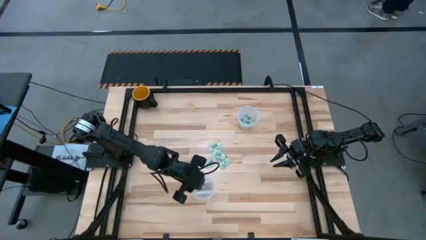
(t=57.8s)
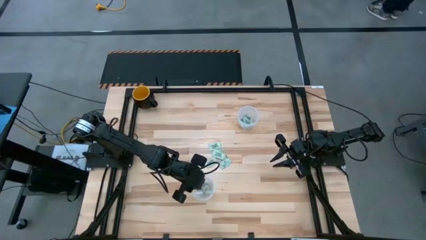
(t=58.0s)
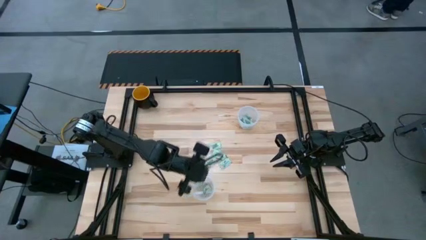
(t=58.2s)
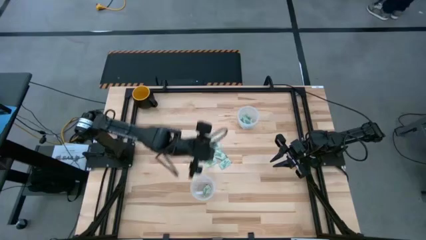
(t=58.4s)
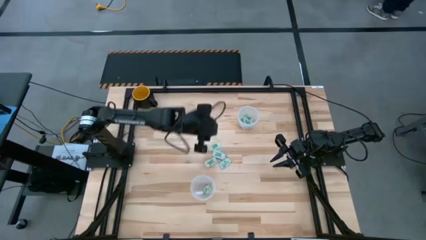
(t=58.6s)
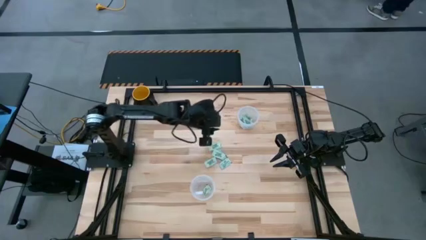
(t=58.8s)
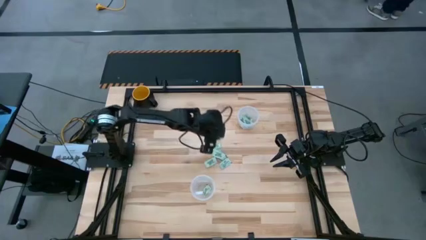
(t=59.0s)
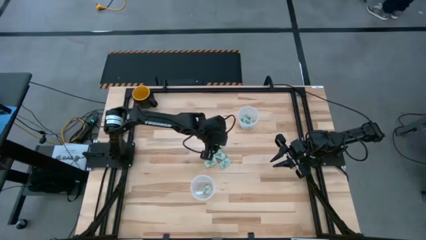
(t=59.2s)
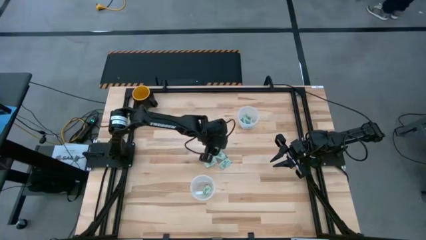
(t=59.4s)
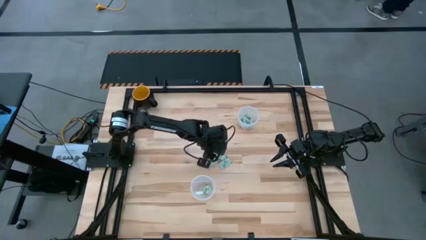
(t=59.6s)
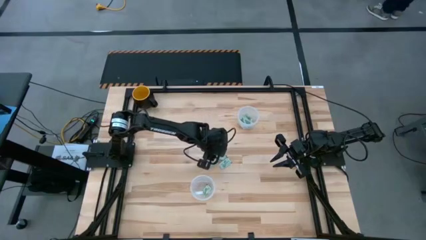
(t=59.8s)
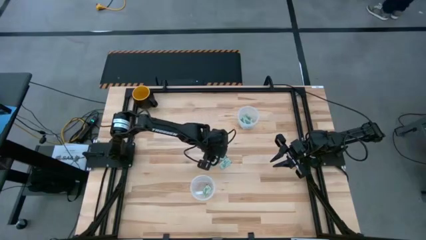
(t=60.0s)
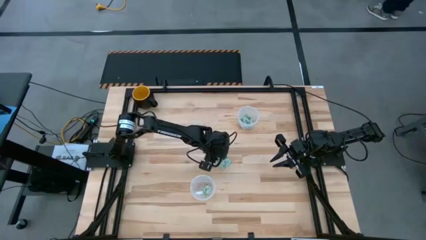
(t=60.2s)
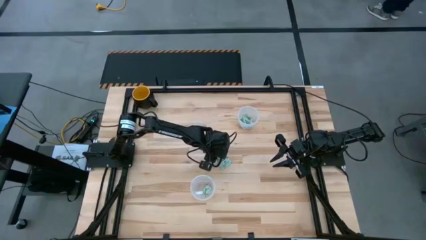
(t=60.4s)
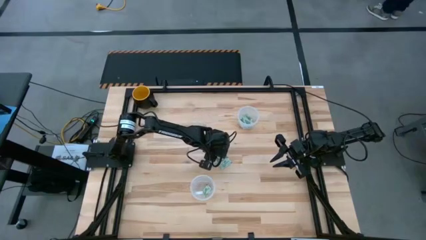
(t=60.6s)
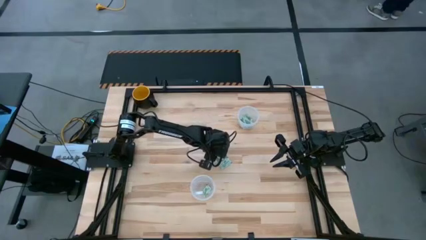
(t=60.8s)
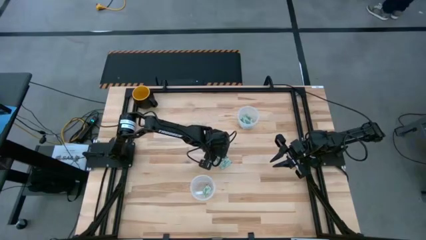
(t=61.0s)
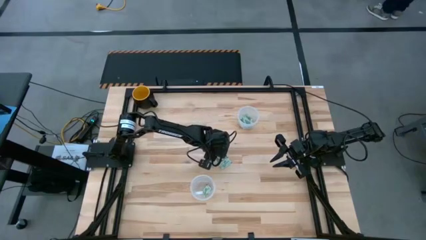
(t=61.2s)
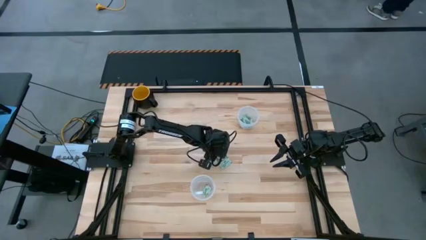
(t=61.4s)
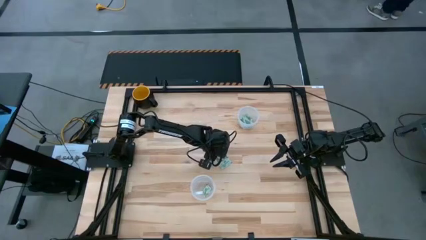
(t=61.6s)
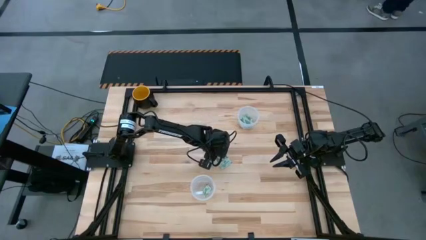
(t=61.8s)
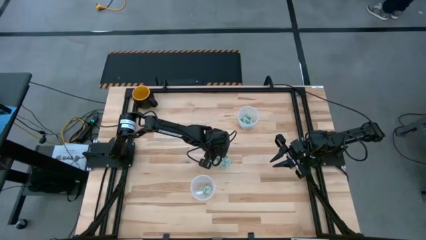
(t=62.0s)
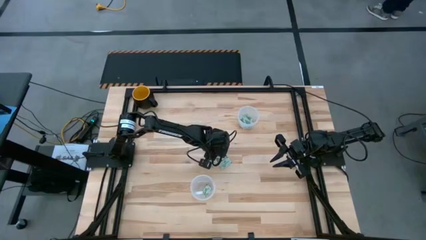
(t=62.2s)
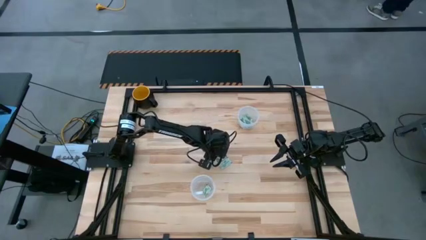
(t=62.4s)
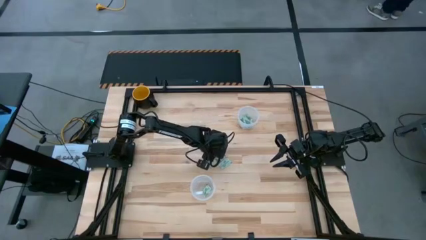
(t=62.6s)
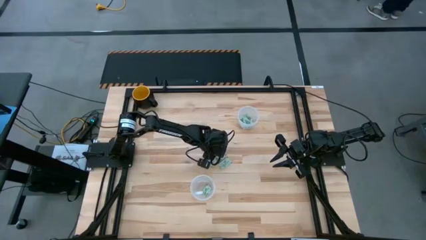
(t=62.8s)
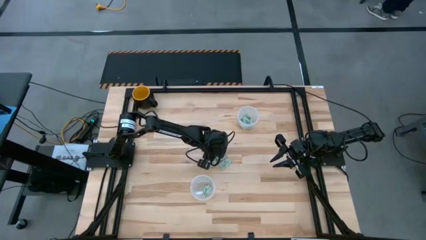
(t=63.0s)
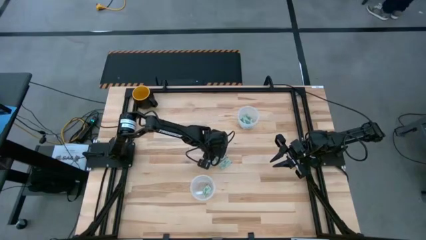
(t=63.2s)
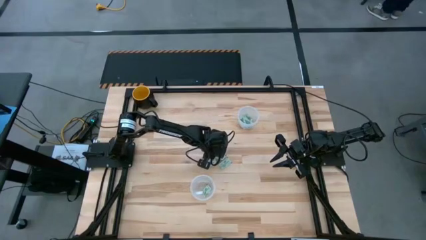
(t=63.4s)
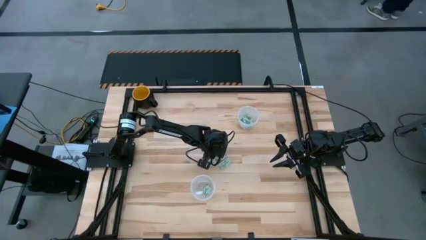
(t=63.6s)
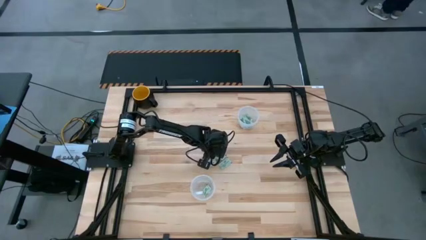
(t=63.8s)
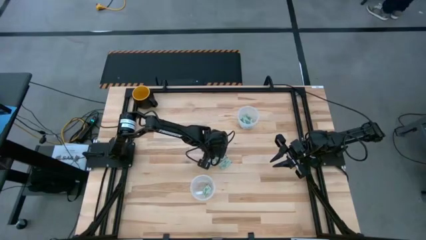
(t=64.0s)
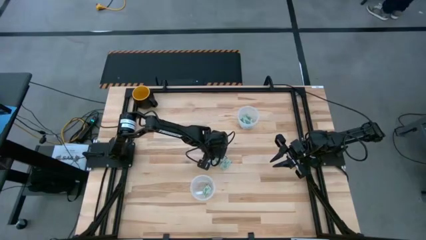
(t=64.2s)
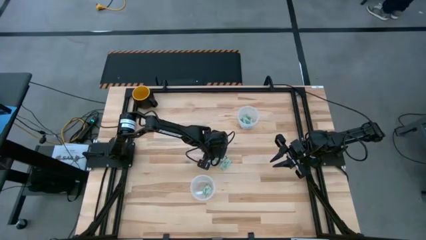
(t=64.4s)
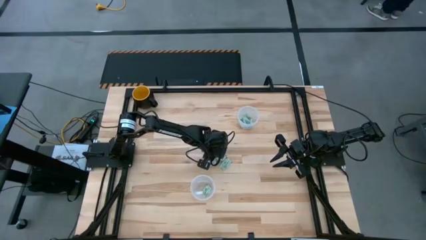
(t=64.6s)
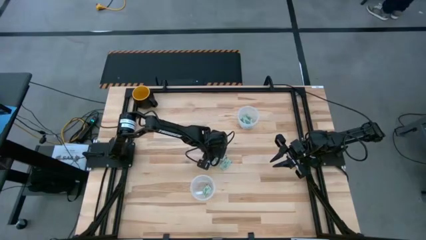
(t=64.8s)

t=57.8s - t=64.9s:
Task: Pick and place Stevia / Truvia into bins
Put the stevia packet into the bottom transparent container

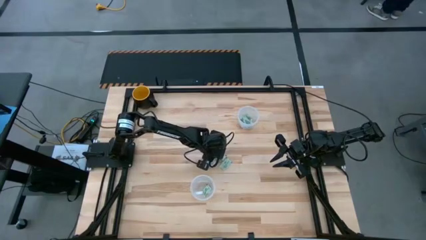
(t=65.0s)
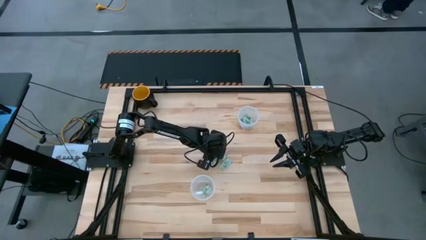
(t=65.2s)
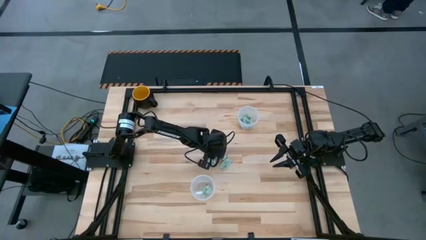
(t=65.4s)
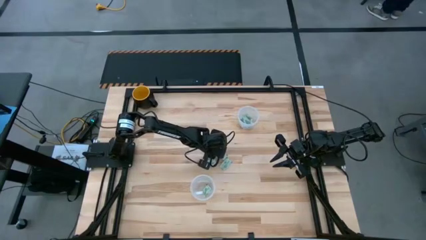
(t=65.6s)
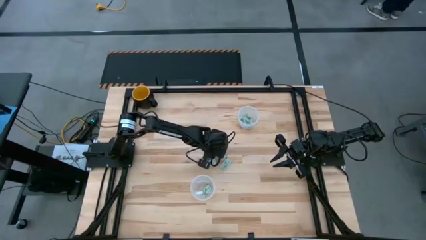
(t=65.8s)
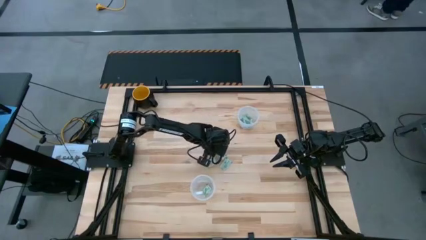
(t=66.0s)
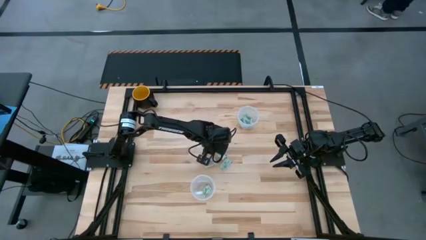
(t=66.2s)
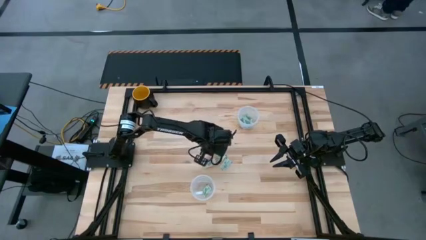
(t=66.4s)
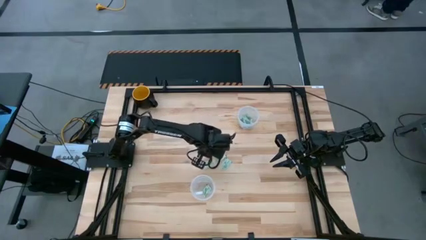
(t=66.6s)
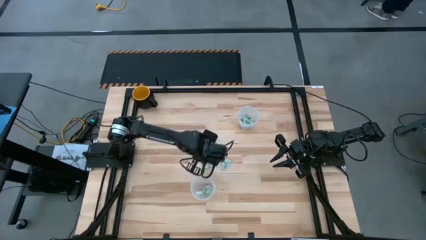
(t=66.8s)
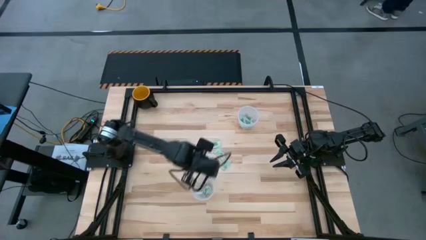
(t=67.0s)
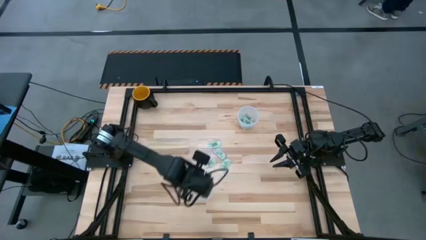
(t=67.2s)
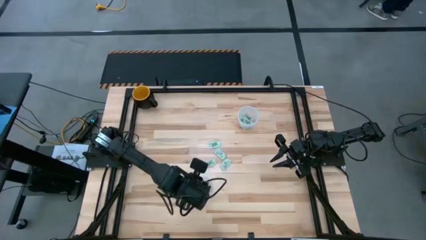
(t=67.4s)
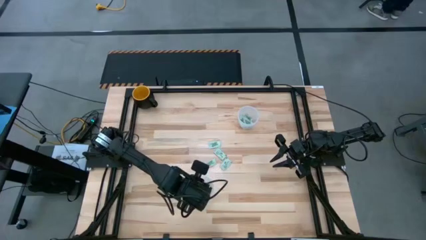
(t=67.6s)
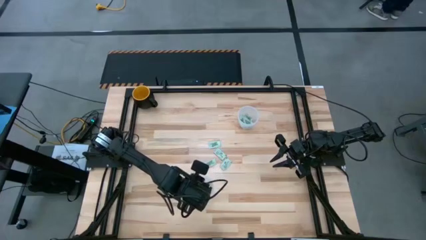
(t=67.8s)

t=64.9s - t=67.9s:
Put the stevia packet into the bottom transparent container

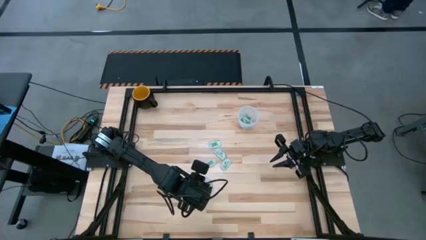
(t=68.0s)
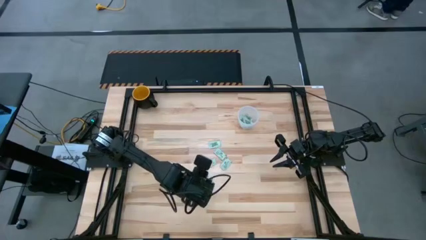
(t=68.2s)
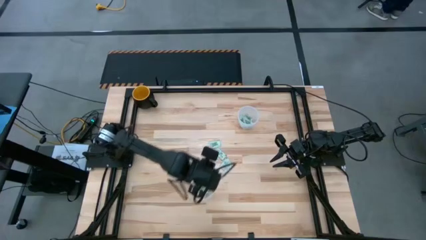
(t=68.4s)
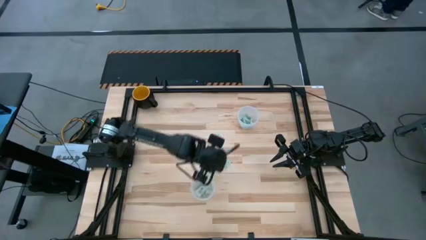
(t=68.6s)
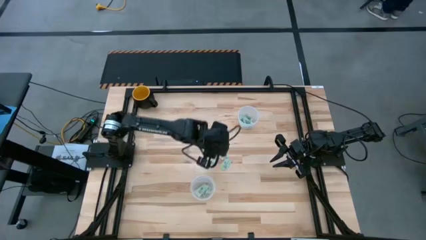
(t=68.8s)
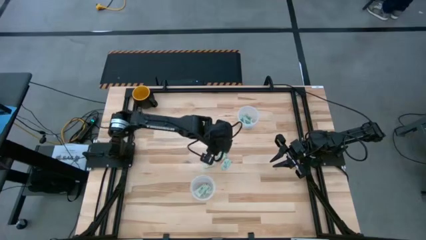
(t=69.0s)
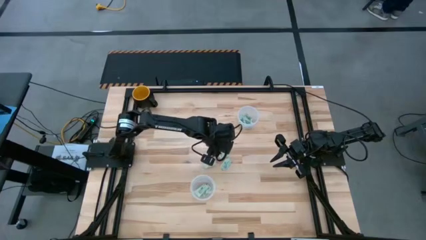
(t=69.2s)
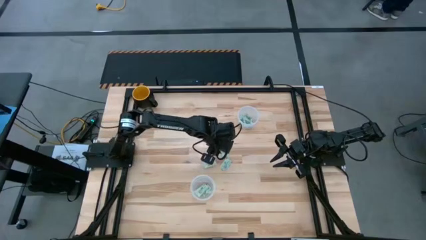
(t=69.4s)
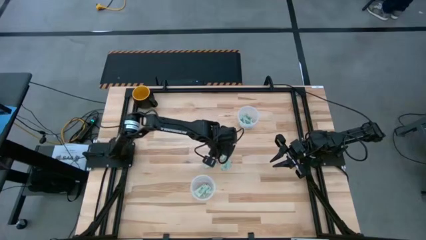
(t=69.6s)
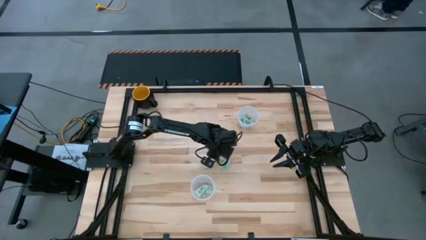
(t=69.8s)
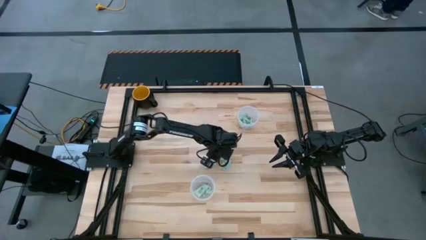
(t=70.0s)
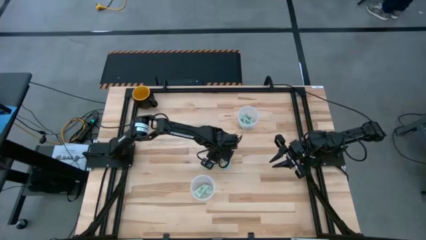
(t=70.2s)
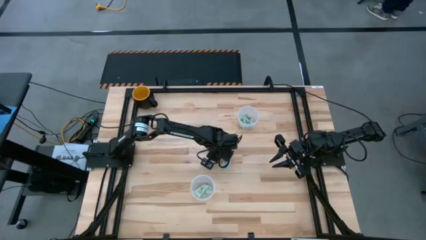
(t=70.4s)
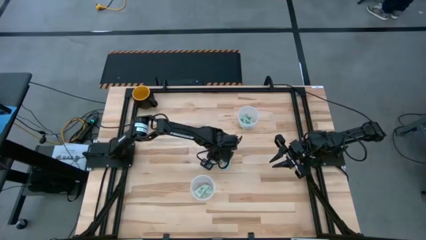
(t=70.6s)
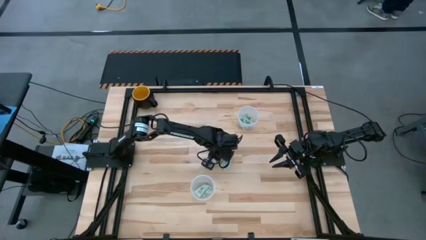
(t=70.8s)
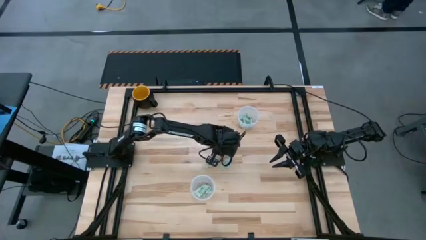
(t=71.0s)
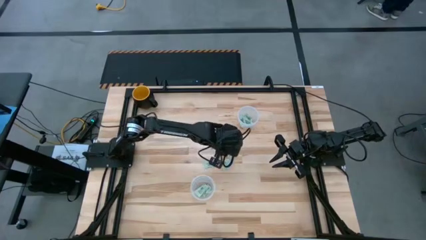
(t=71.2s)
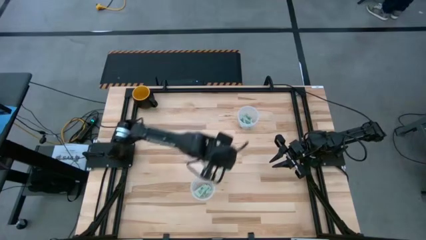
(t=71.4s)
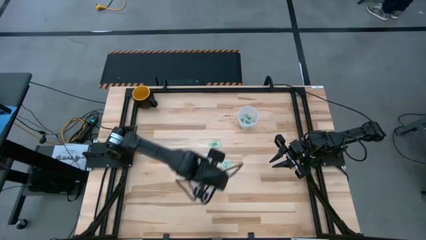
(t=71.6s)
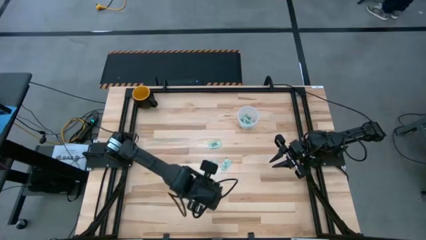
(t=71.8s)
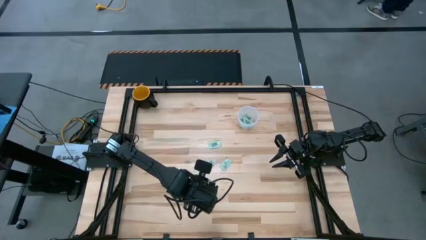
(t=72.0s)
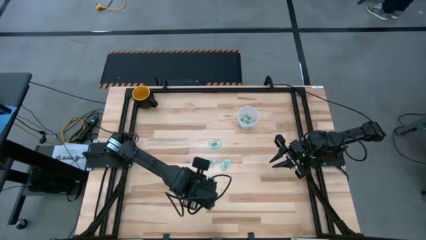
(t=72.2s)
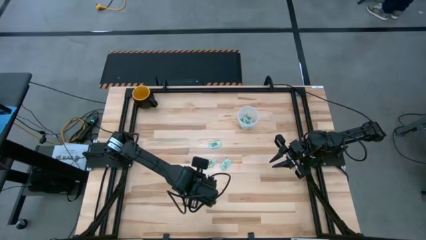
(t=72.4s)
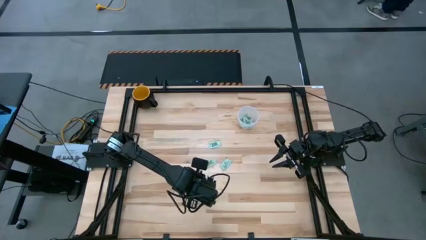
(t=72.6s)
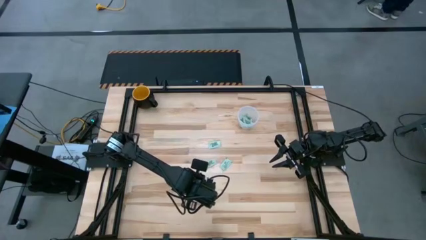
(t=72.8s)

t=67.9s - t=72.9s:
Put the stevia packet into the bottom transparent container
